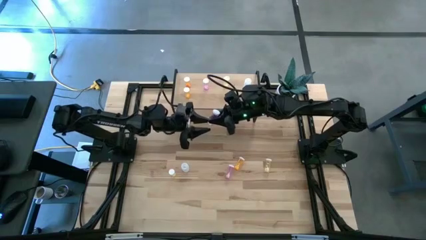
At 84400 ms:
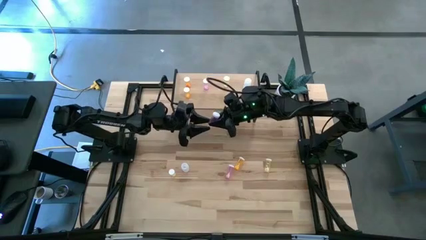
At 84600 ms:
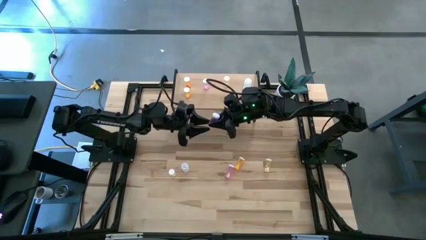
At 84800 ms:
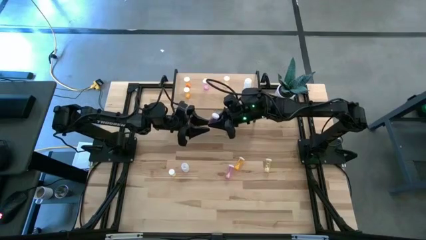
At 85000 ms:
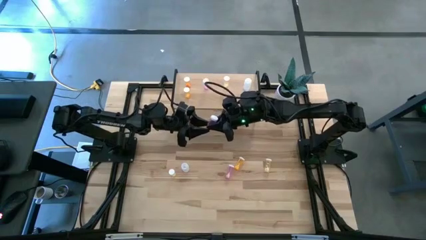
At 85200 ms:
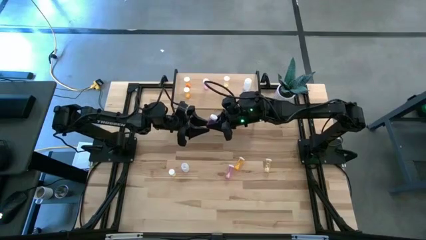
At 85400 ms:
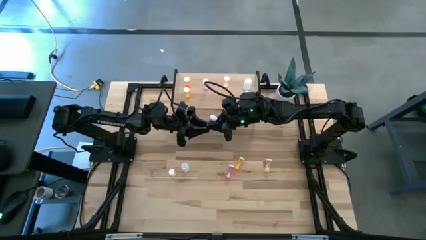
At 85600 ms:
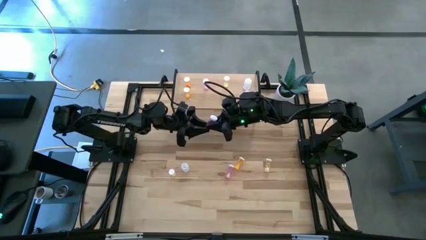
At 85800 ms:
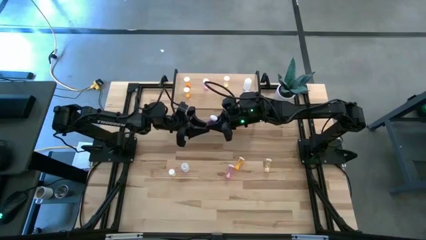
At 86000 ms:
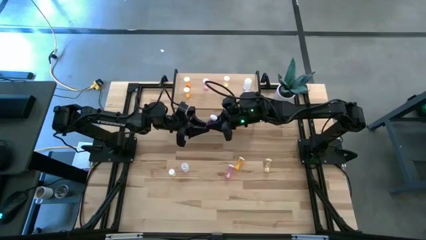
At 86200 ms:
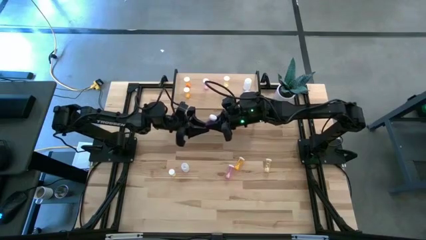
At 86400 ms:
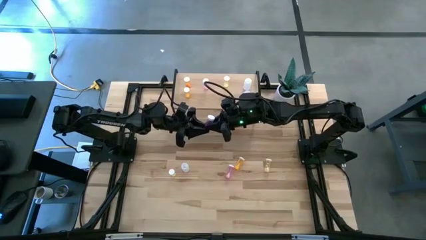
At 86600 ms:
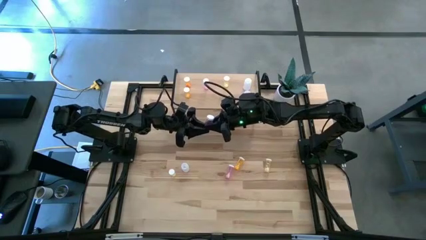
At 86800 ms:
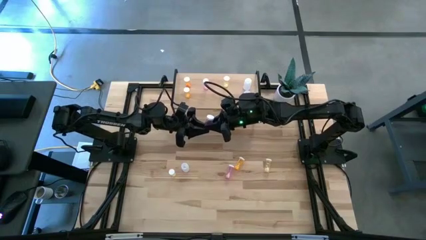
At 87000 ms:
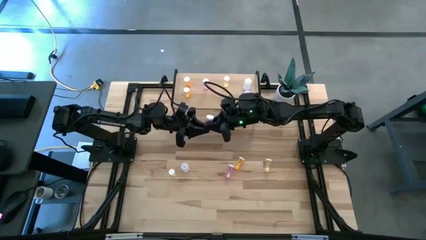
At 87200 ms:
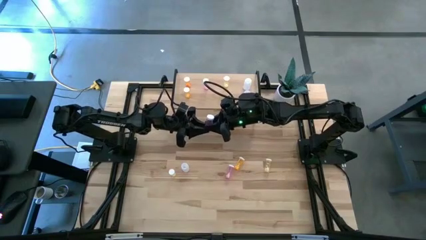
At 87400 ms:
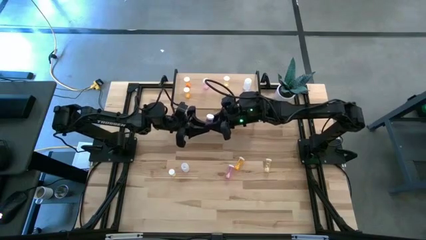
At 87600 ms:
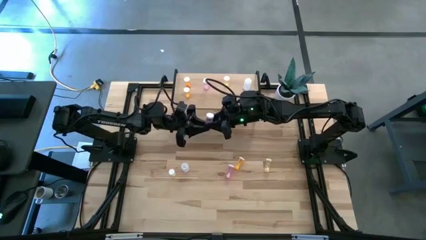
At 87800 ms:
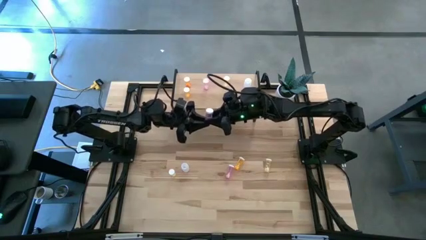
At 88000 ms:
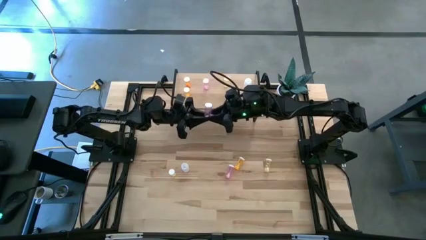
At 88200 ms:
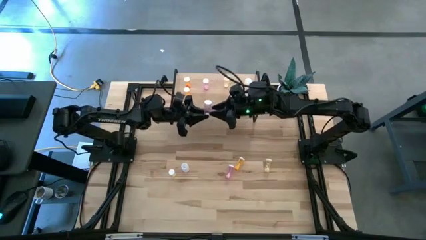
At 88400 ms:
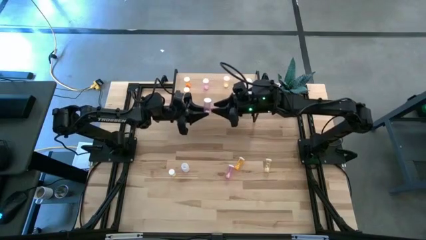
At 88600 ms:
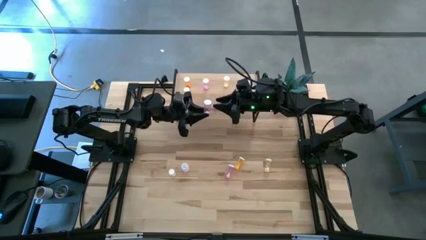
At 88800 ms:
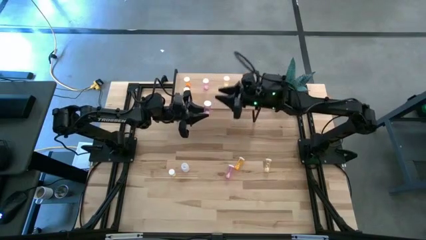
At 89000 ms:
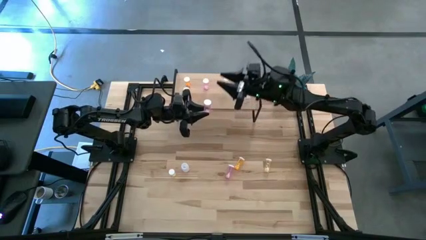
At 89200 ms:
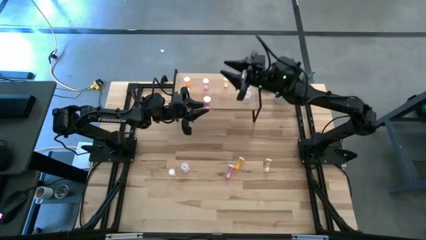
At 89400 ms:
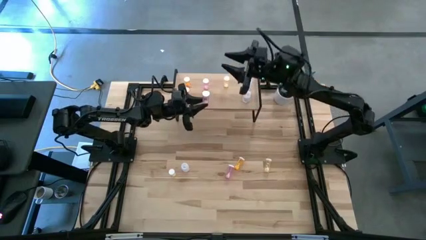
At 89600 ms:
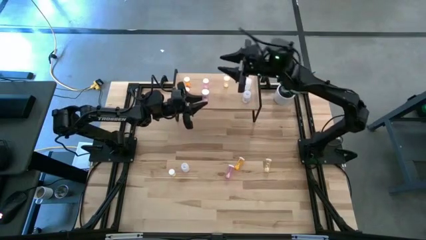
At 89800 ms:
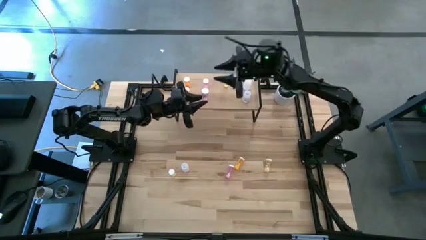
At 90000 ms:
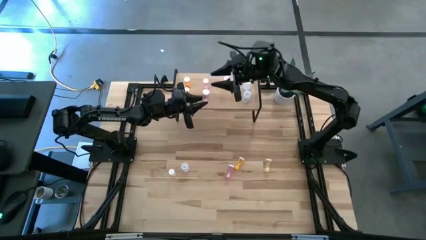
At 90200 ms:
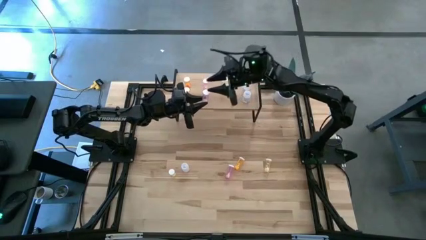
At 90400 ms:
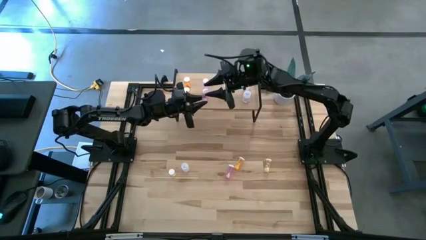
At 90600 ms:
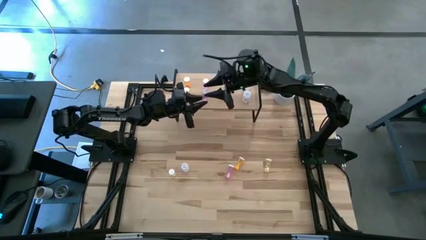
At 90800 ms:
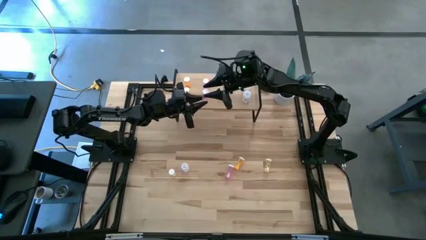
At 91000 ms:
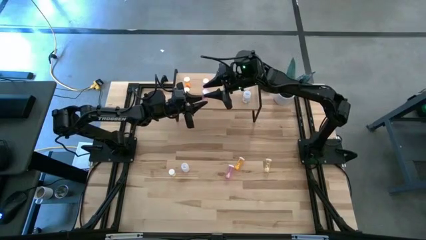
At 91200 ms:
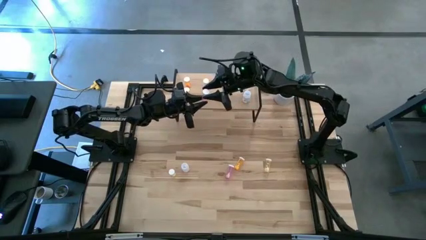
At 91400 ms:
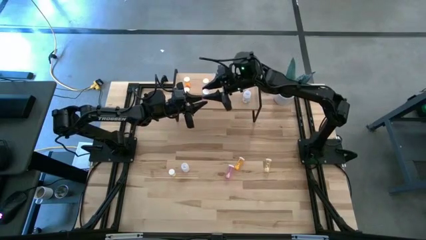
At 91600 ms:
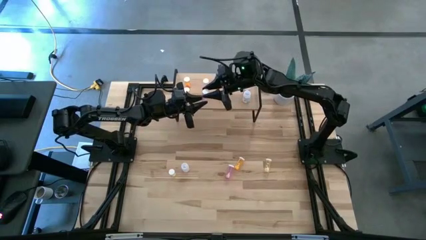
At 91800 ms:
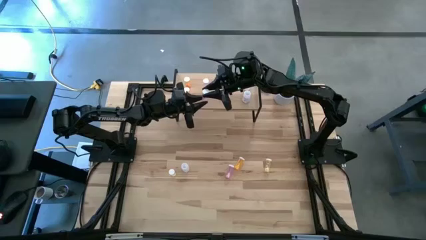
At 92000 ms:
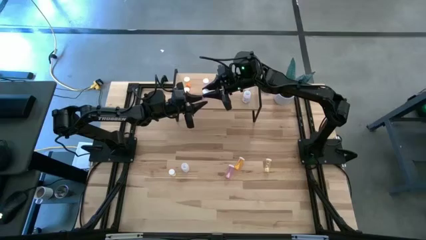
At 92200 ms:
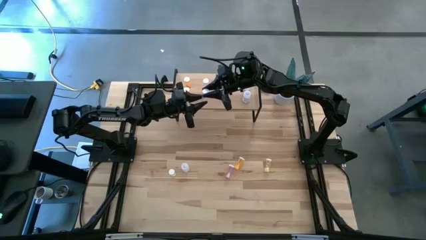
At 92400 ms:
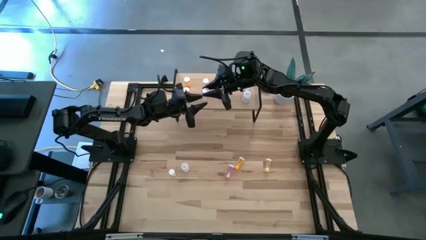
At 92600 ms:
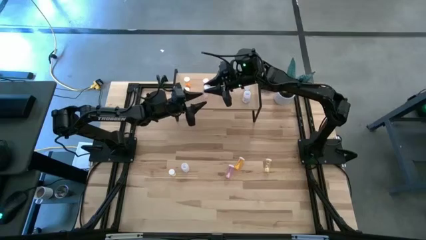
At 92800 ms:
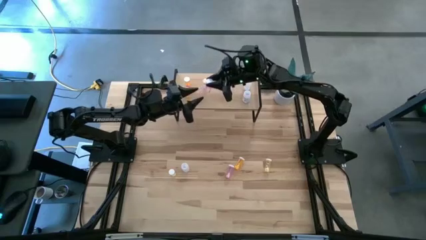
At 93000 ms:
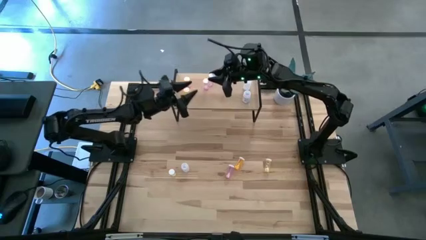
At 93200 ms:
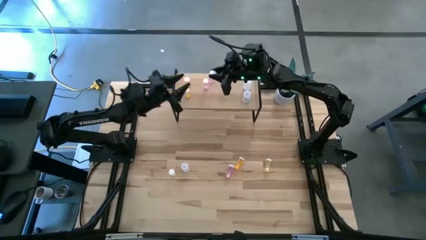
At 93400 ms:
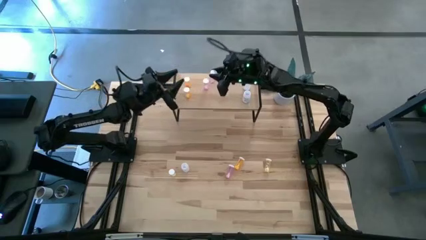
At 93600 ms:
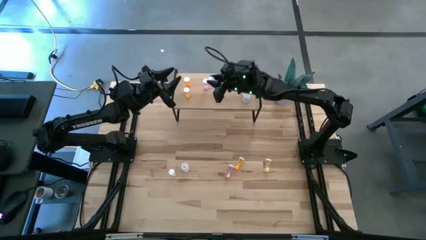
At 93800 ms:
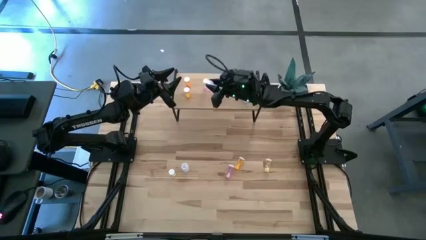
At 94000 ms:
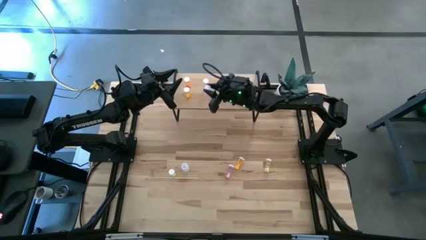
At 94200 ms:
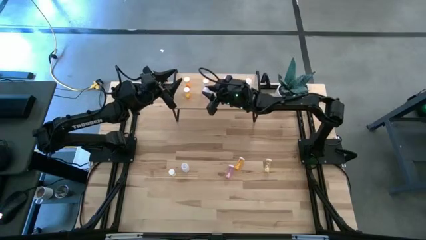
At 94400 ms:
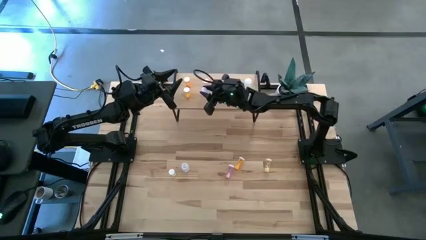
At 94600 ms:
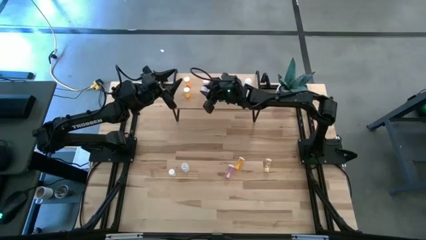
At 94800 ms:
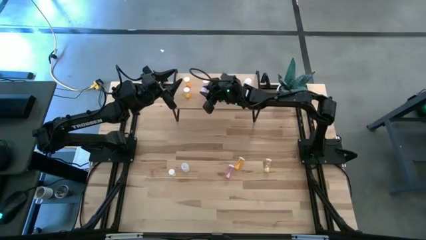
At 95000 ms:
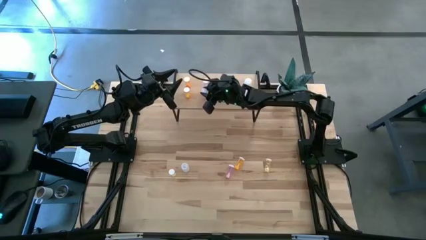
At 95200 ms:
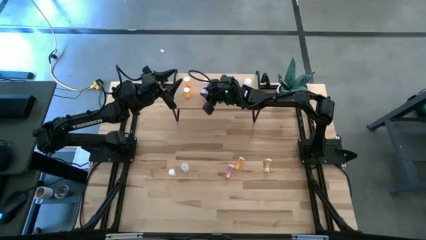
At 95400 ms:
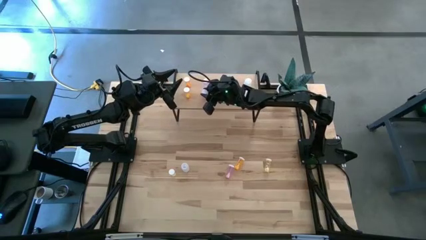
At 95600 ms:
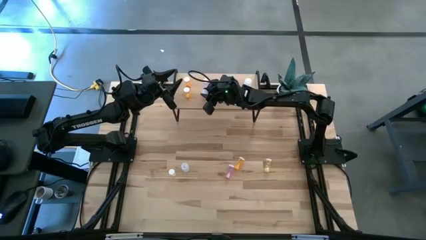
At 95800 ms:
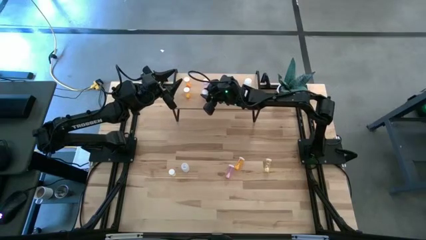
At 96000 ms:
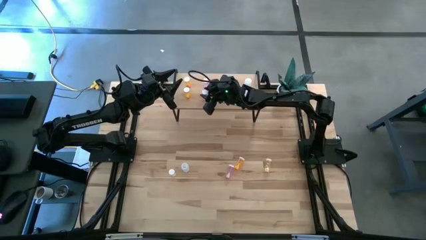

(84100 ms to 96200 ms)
Task: Pick and place medicine bottles onto shelf by color
Put the right pink pill bottle on the shelf aligned with the other pink pill bottle
